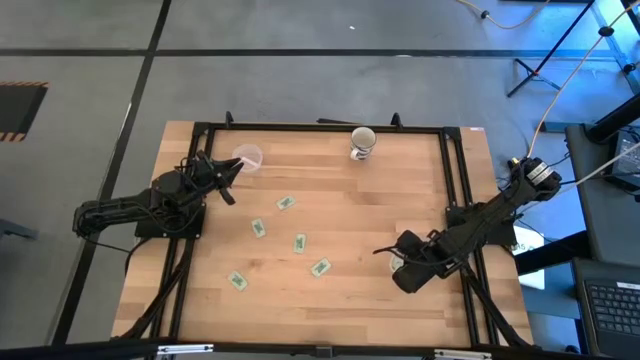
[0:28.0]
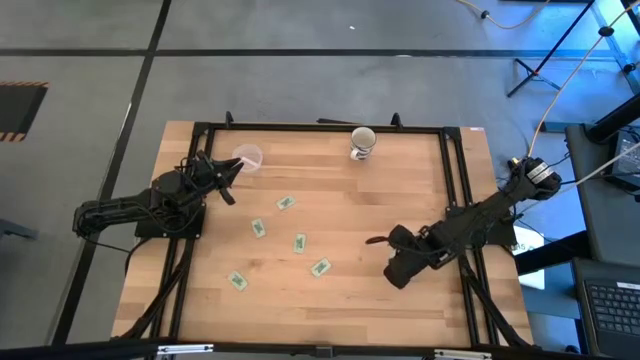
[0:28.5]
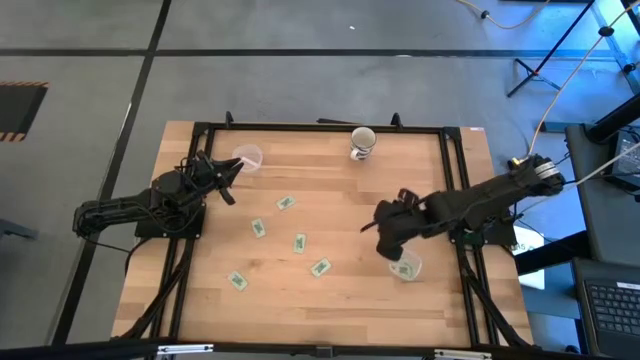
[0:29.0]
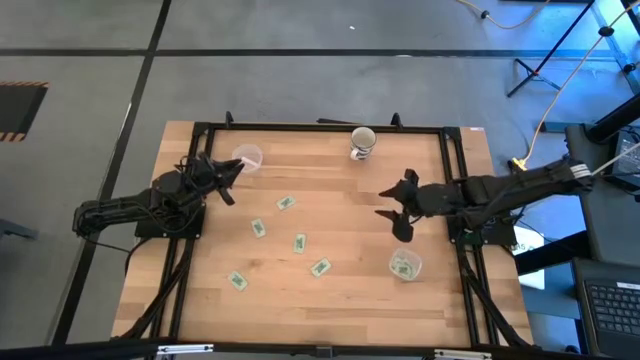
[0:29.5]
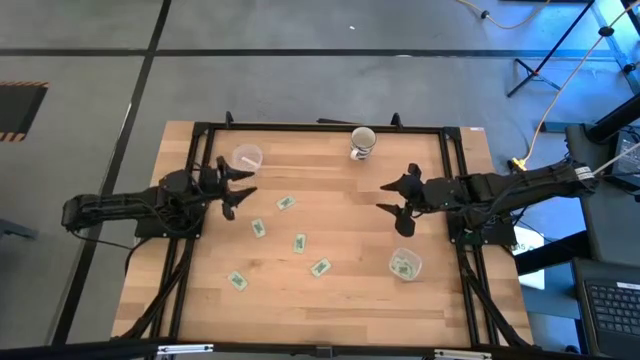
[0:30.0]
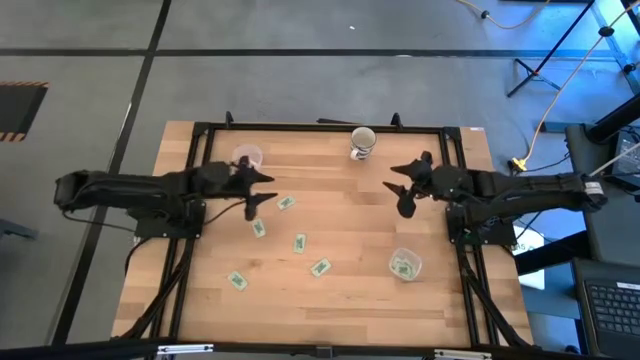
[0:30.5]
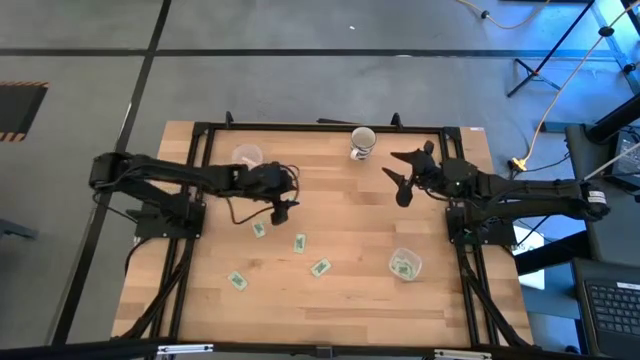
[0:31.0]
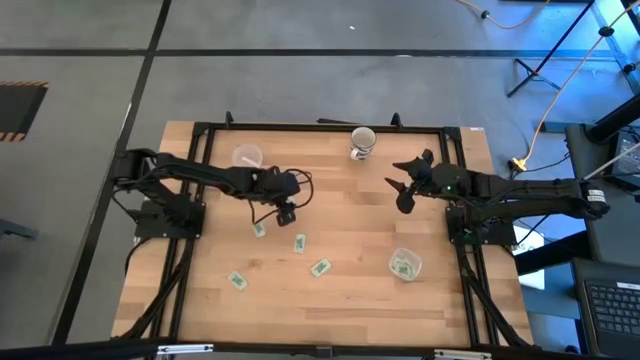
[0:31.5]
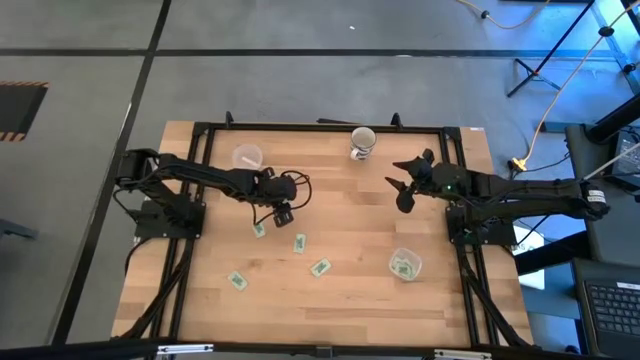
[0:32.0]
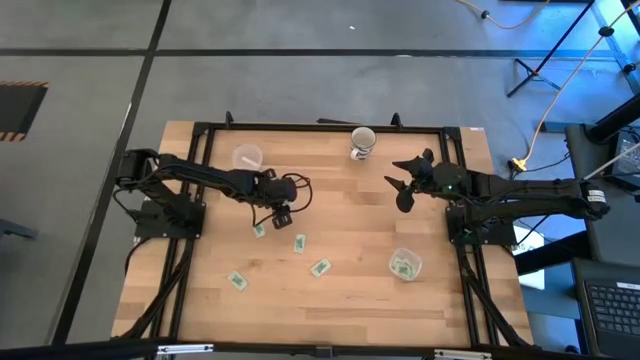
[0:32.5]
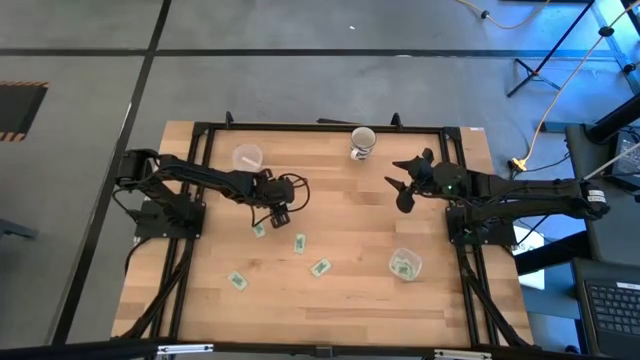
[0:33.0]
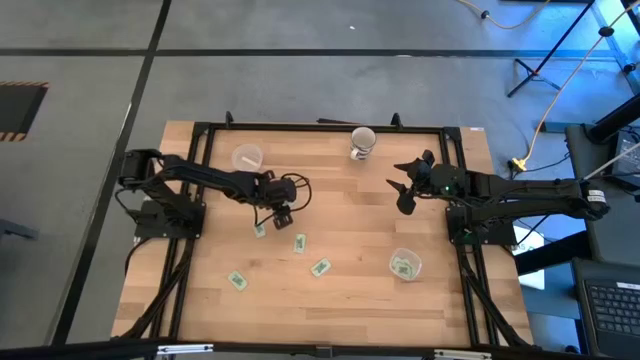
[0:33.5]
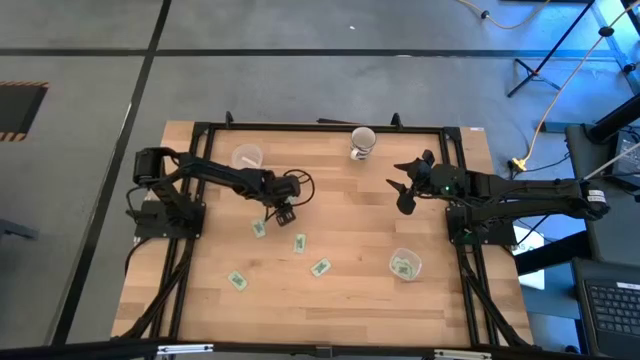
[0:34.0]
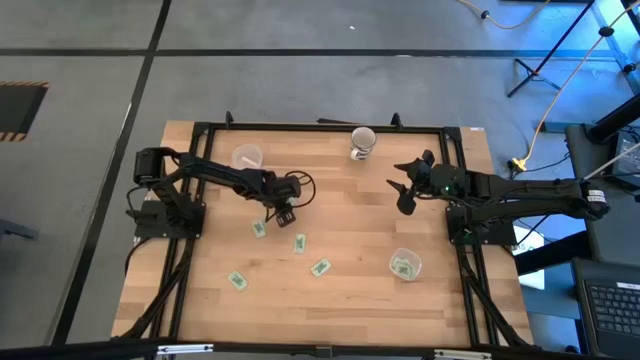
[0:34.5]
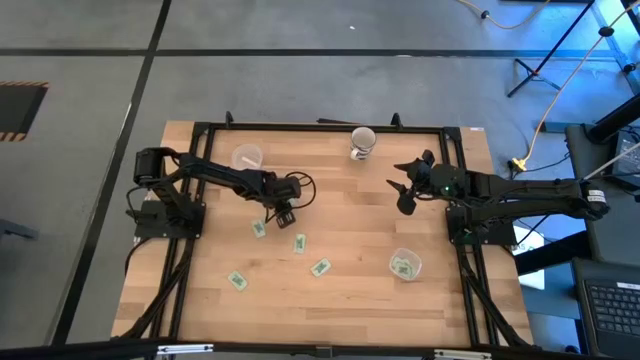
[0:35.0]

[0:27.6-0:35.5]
Task: Pick and place items into bin
Put the white stevia packet into the top transparent bin

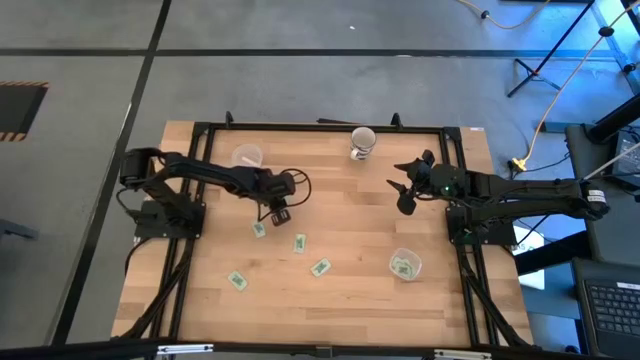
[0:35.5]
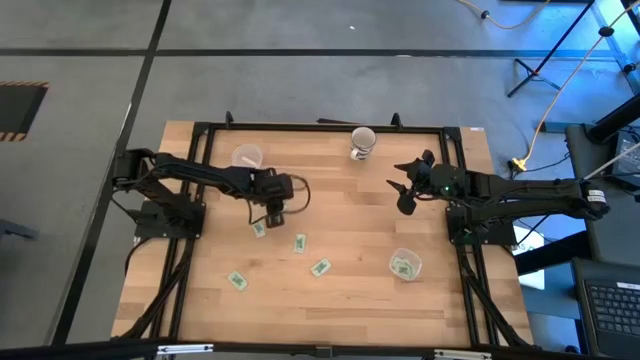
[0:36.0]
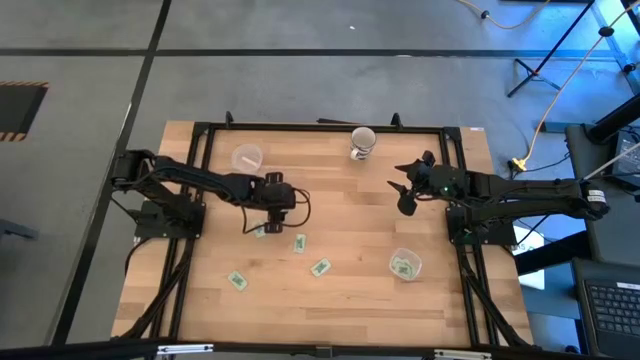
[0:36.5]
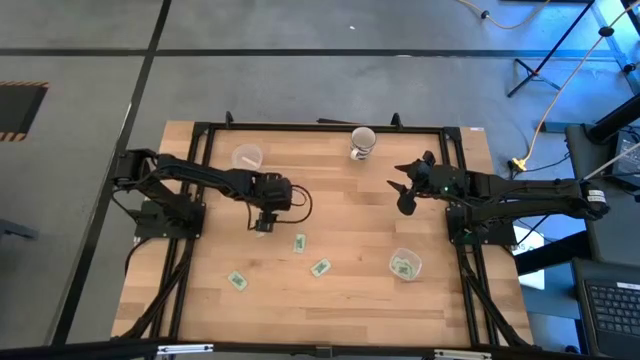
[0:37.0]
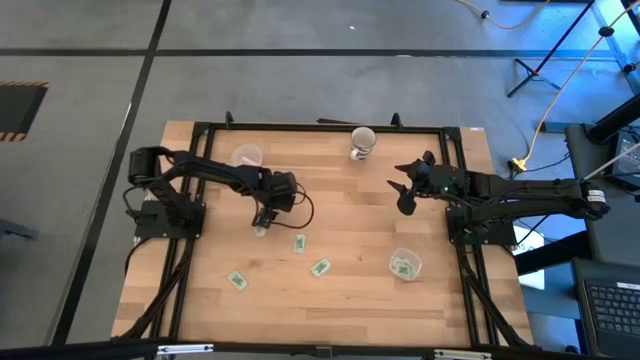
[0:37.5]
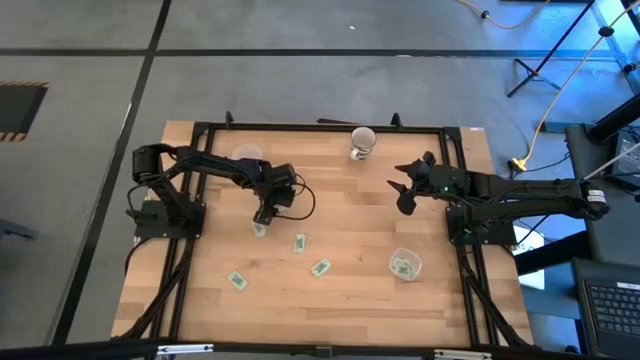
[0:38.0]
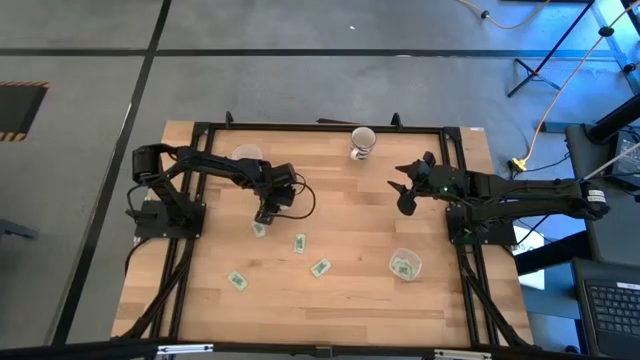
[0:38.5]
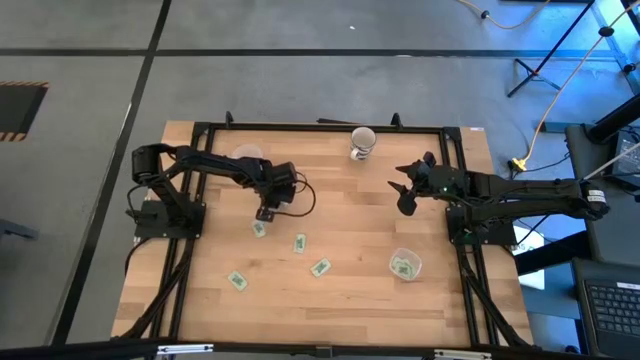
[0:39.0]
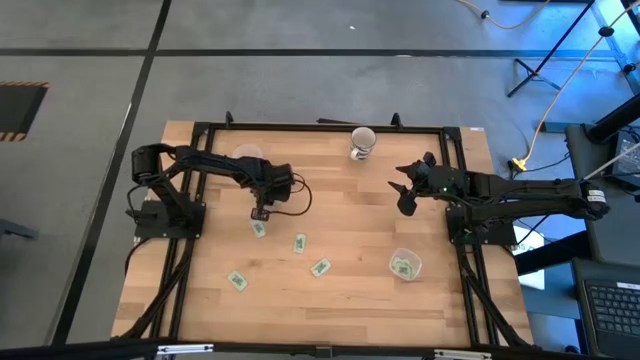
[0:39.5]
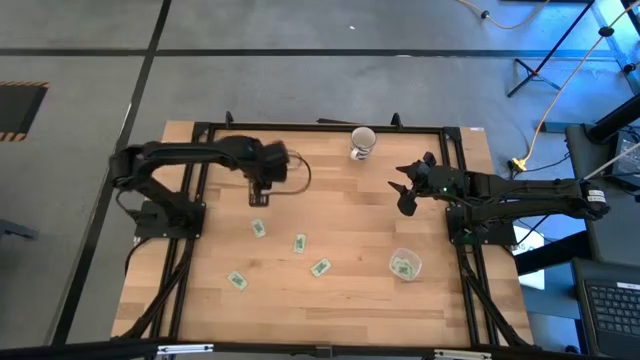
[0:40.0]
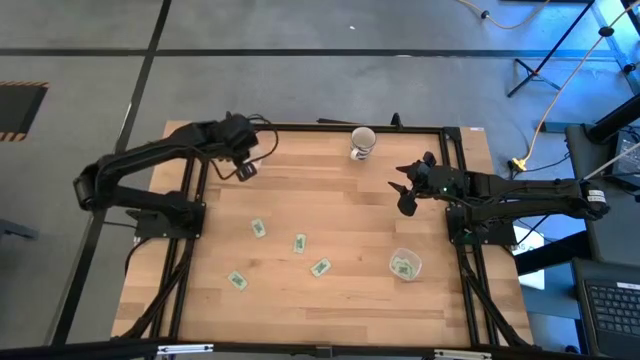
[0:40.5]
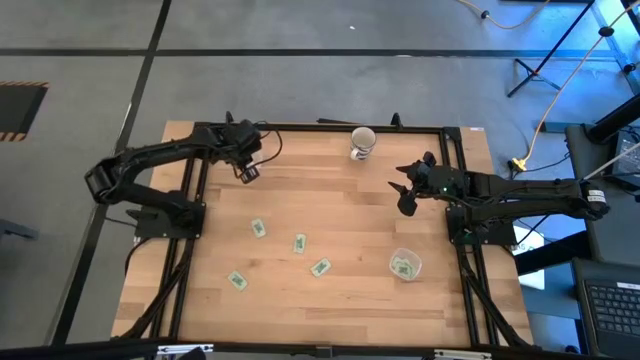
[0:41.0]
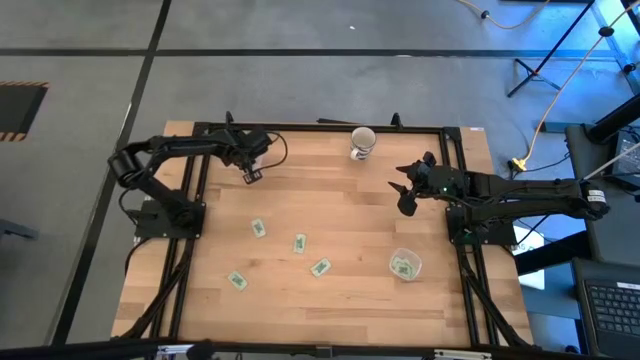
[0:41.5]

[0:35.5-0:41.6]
Put the white stevia packet into the top transparent bin

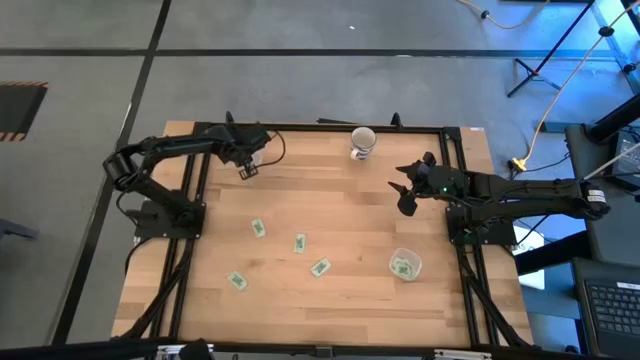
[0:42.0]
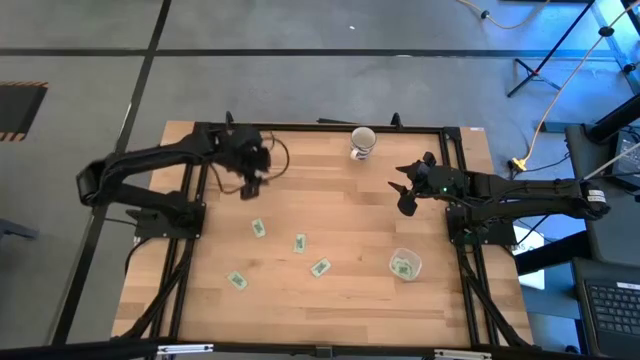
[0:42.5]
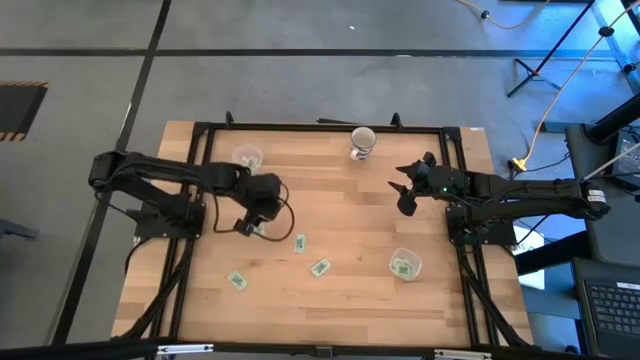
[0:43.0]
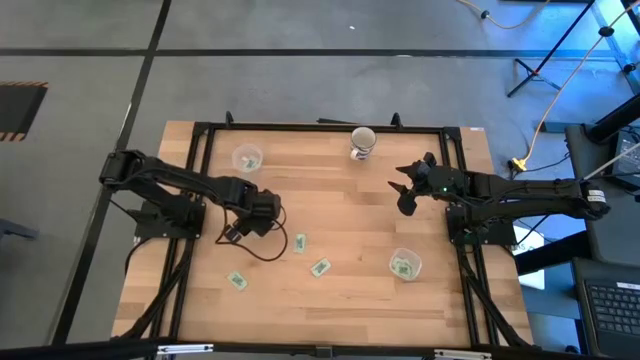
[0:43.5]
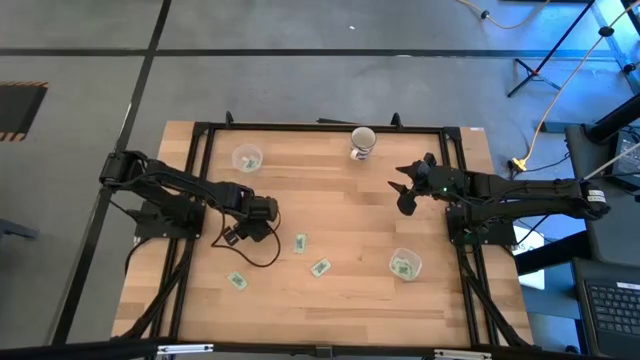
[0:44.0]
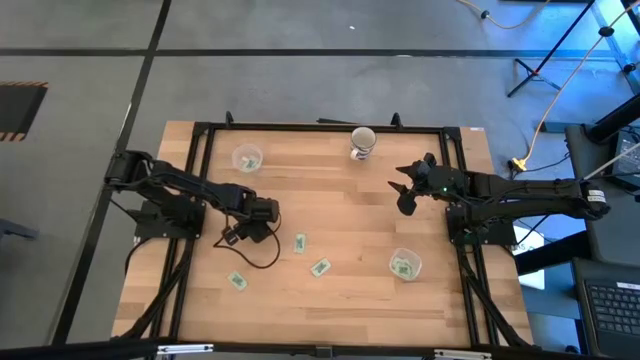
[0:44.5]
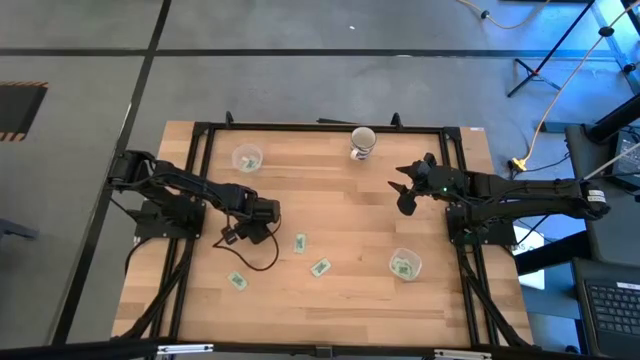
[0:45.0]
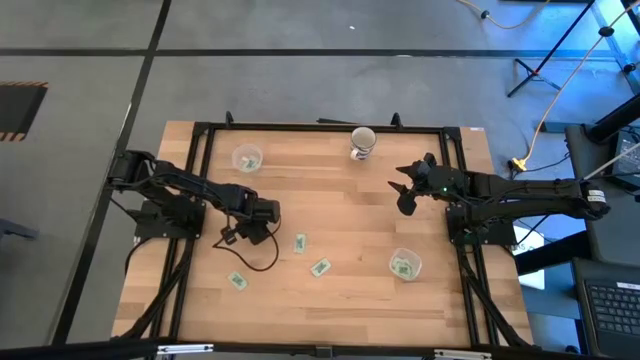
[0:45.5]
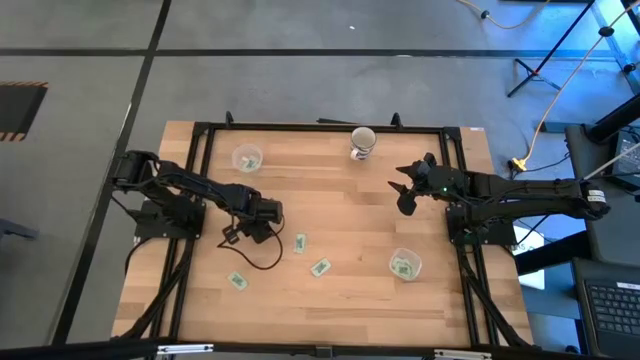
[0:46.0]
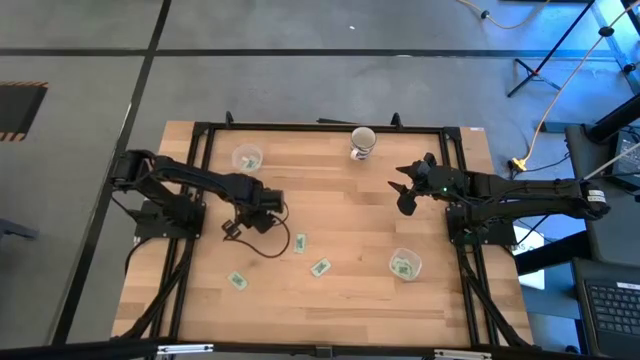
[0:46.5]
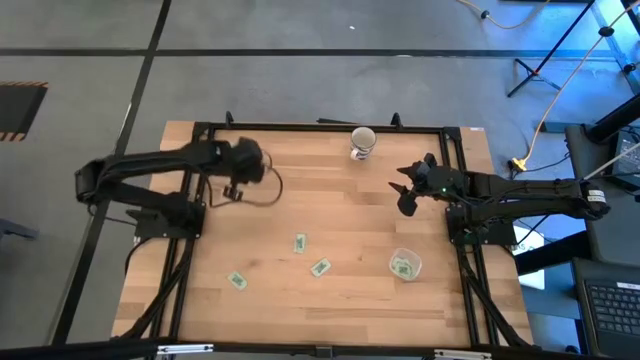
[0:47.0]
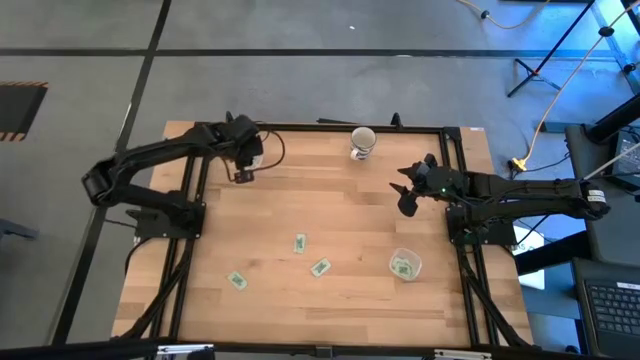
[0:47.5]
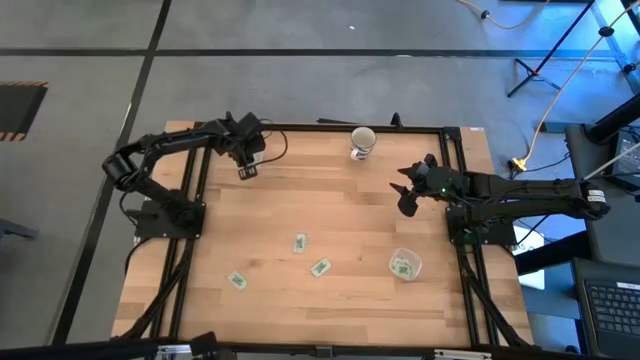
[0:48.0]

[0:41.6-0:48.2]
Put the white stevia packet into the top transparent bin
